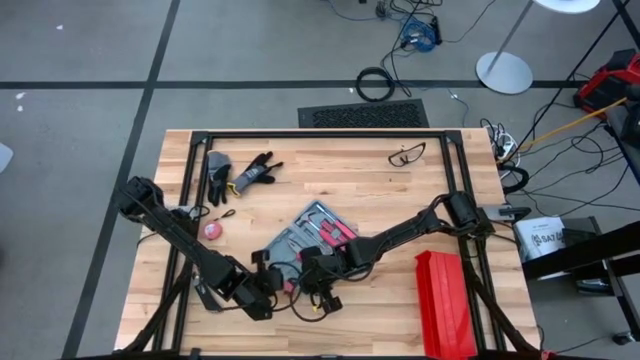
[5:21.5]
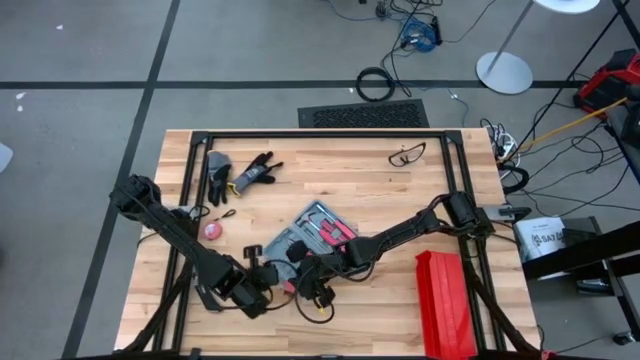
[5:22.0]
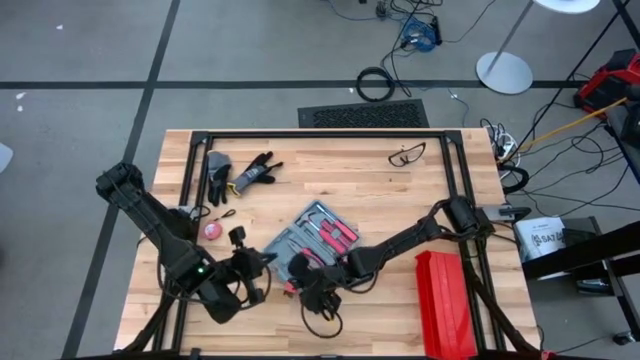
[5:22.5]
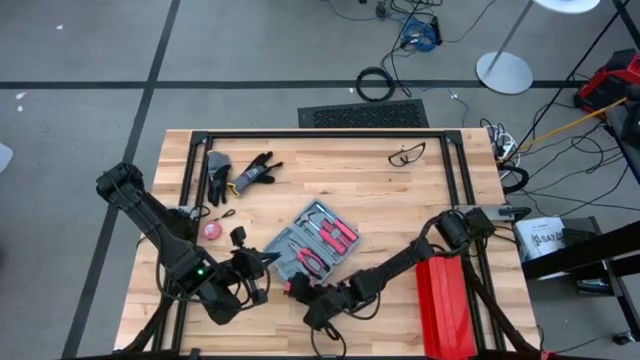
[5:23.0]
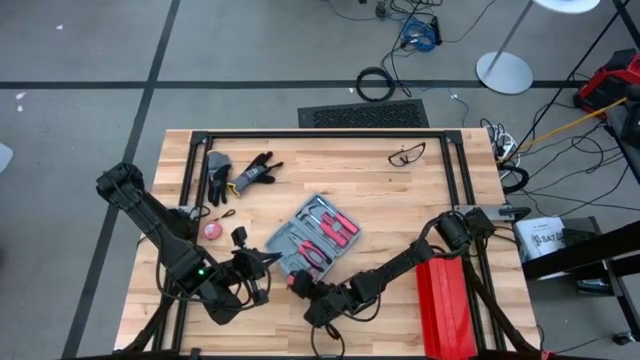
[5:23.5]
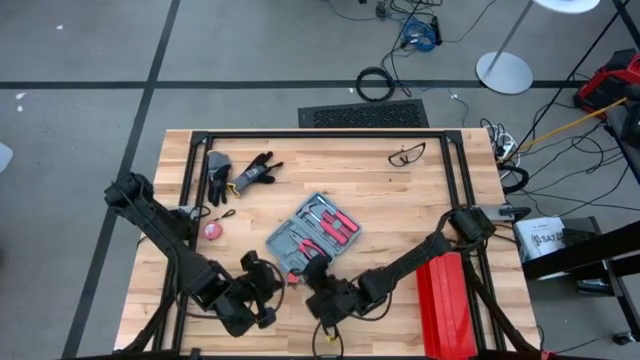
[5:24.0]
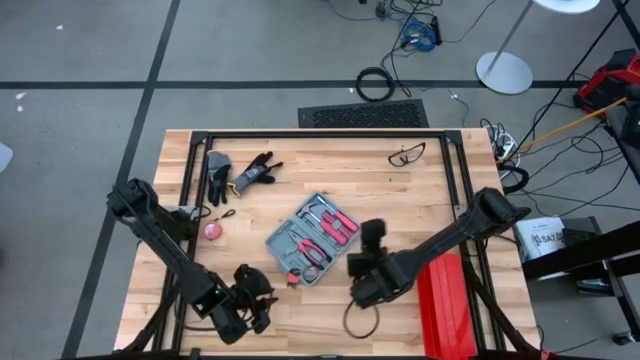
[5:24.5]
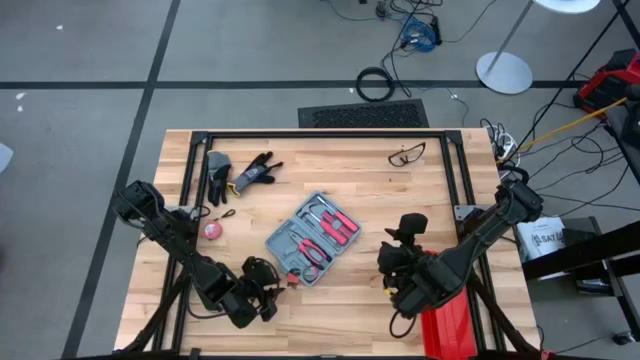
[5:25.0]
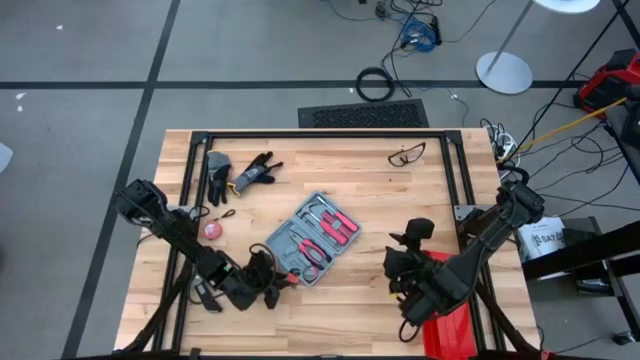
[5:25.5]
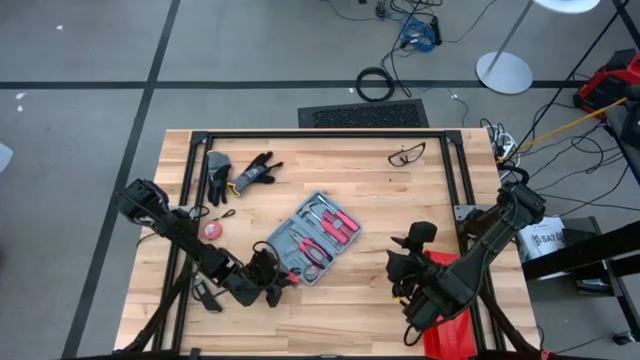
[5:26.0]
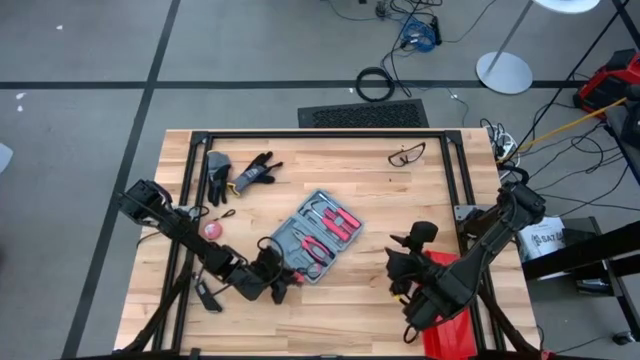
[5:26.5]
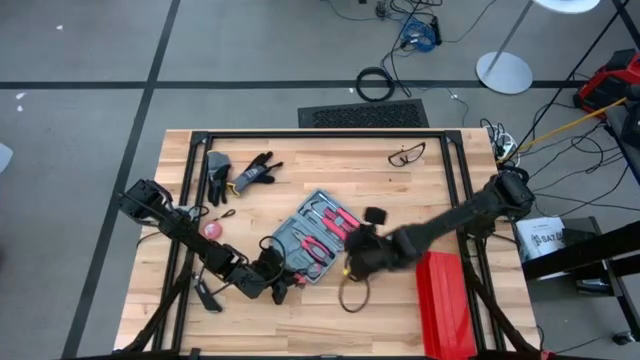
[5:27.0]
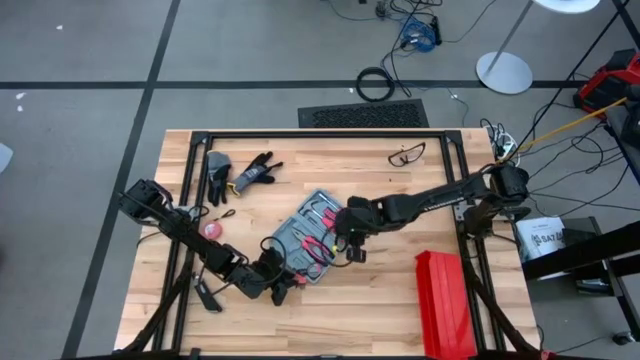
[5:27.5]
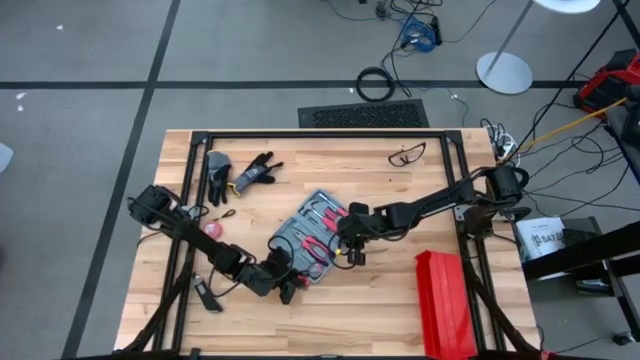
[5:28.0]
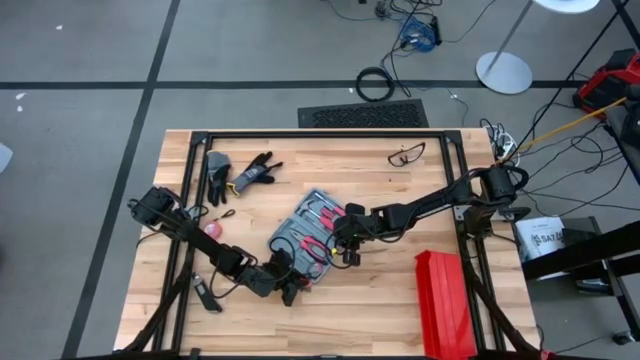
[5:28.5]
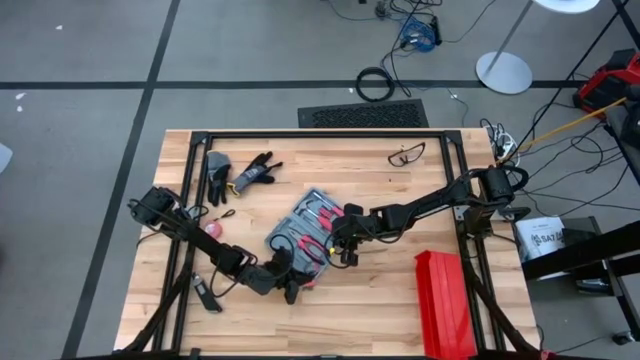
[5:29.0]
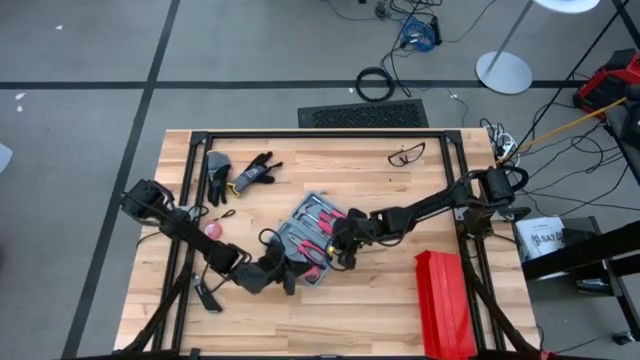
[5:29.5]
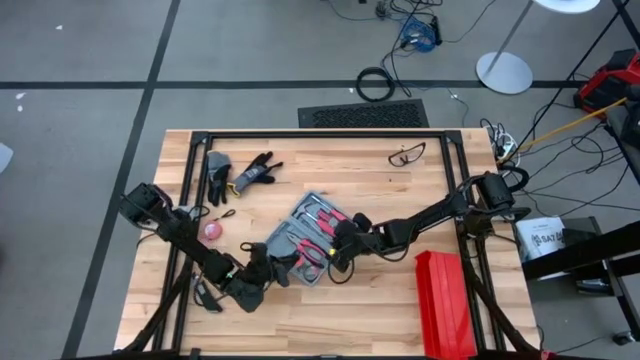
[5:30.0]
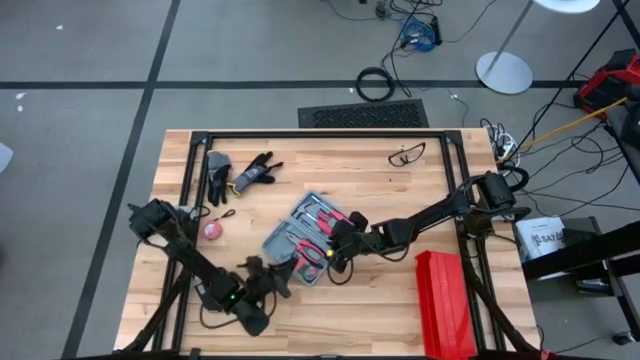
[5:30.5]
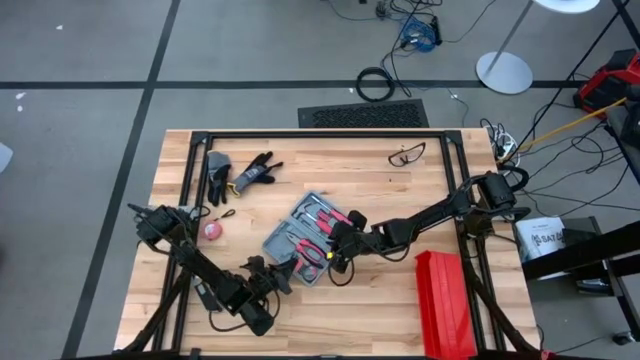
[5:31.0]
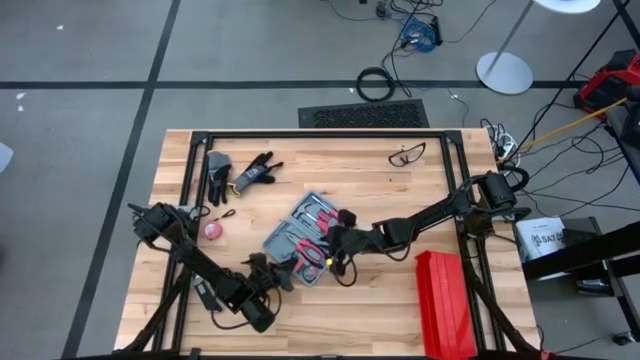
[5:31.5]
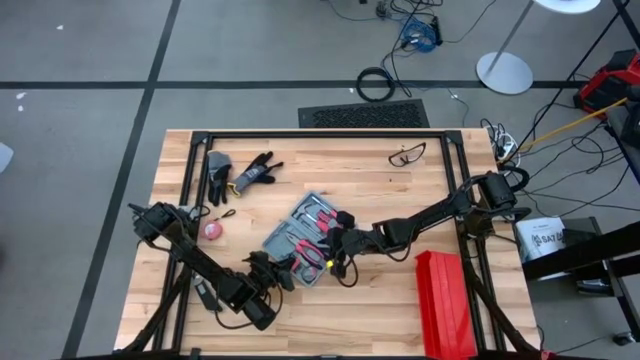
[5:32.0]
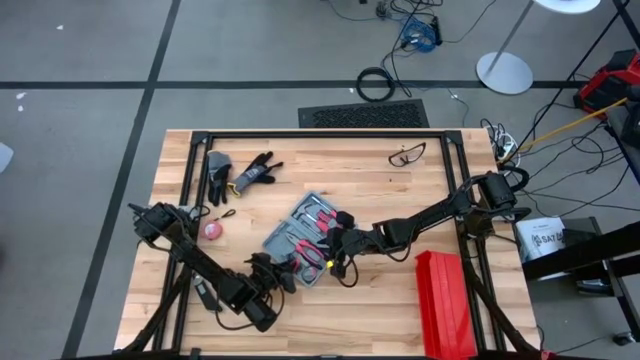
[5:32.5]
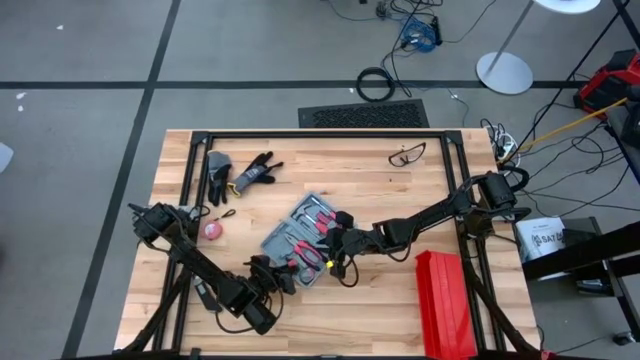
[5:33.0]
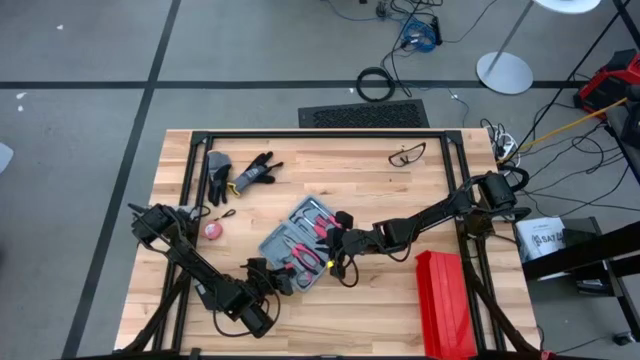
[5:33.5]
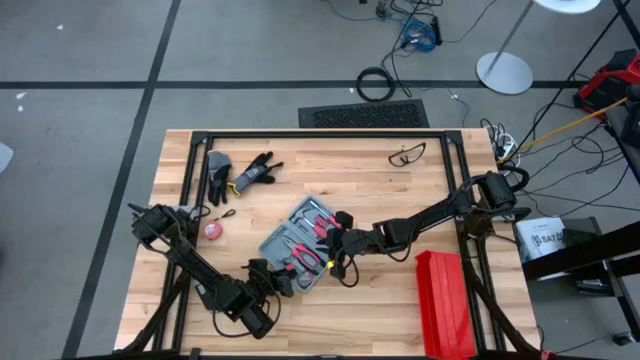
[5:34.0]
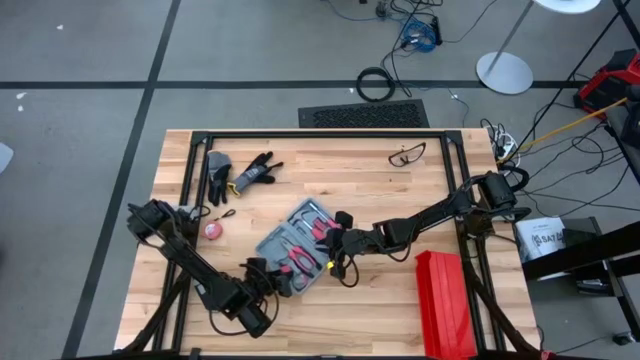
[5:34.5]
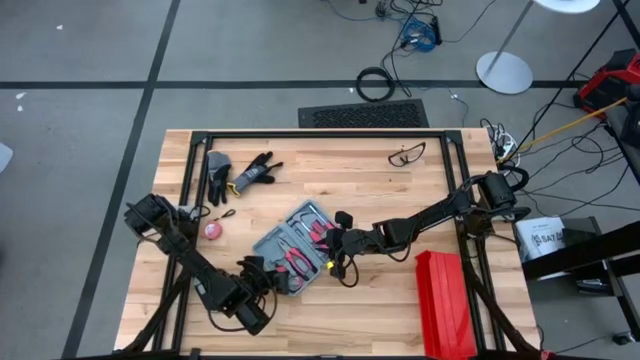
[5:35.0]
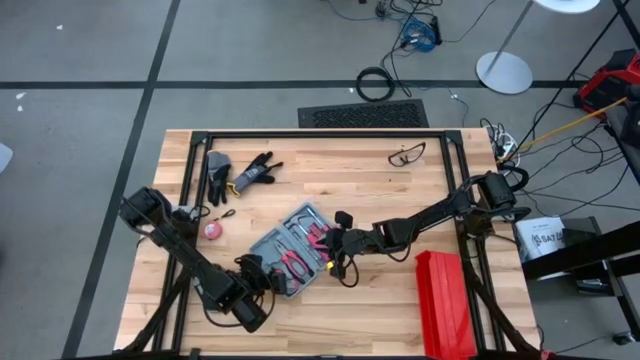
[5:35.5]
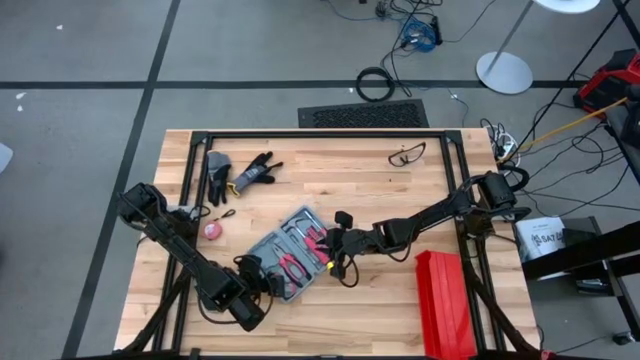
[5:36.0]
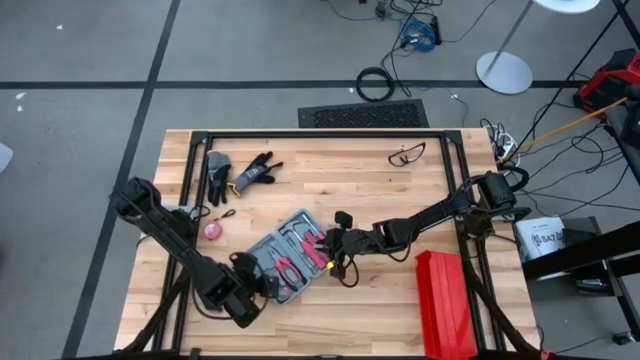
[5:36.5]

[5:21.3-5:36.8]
Task: prefit tool cases
Put the red allen wrench into the gray prefit tools case

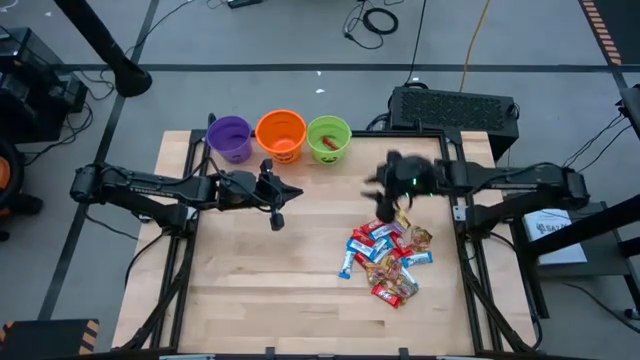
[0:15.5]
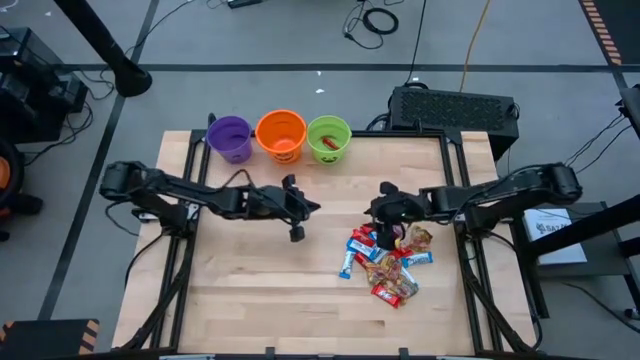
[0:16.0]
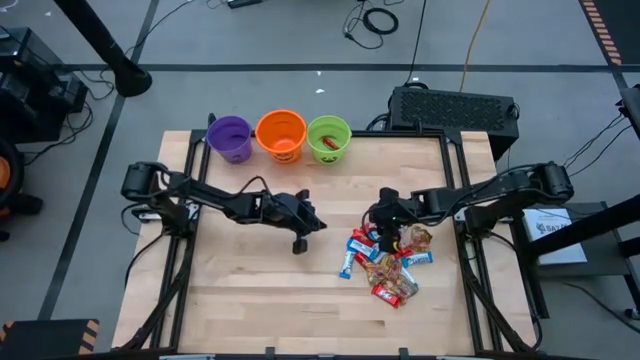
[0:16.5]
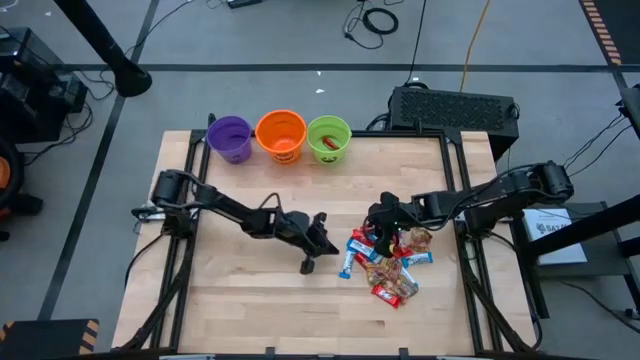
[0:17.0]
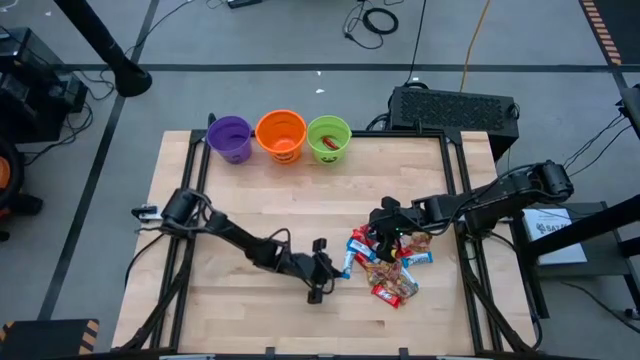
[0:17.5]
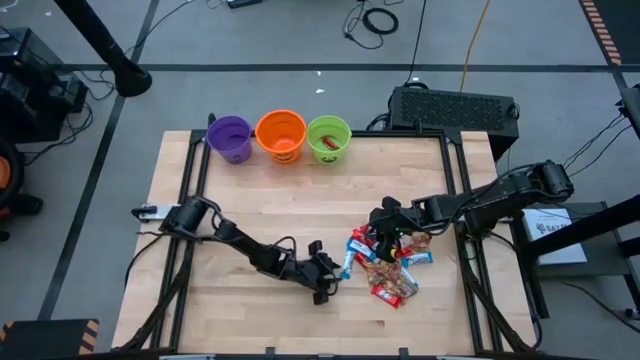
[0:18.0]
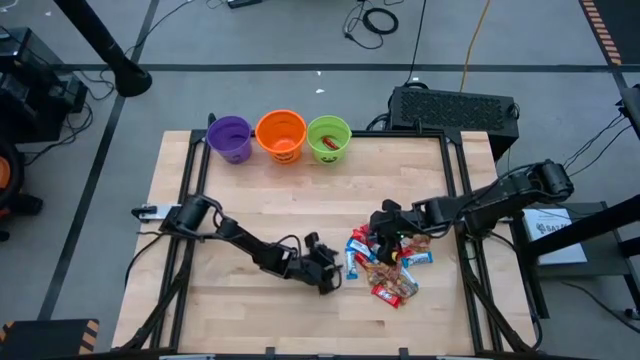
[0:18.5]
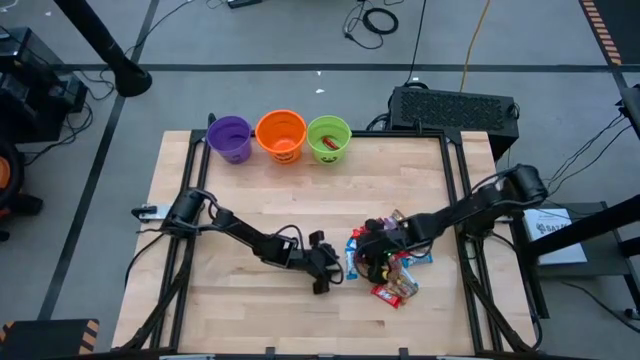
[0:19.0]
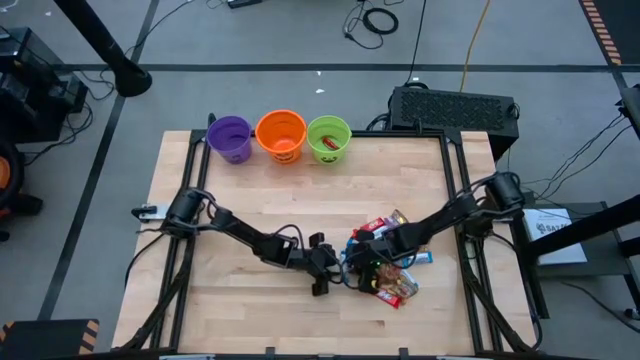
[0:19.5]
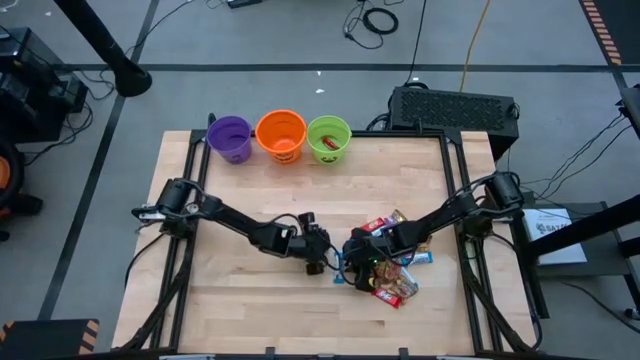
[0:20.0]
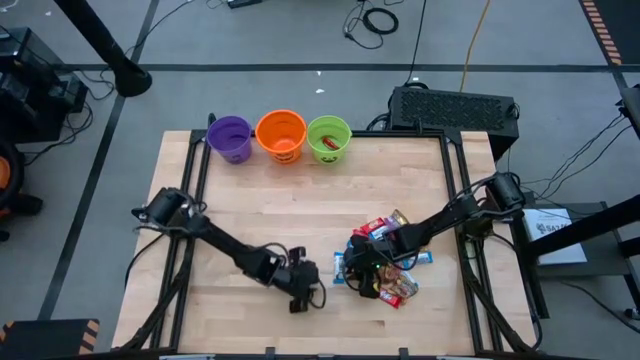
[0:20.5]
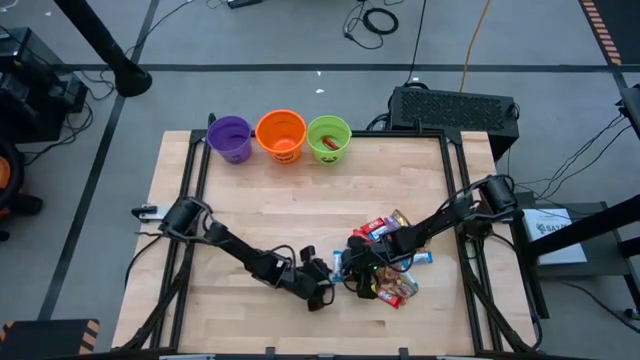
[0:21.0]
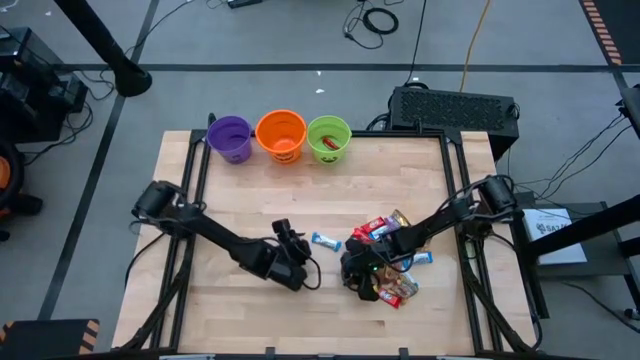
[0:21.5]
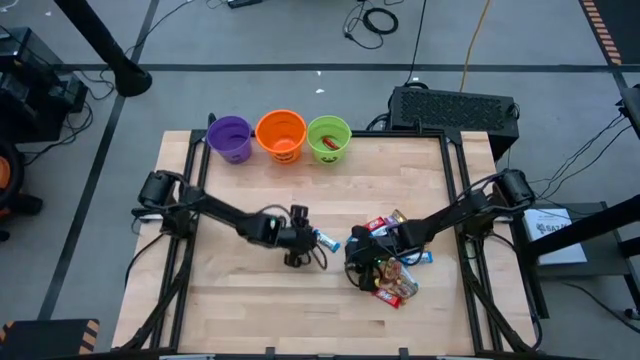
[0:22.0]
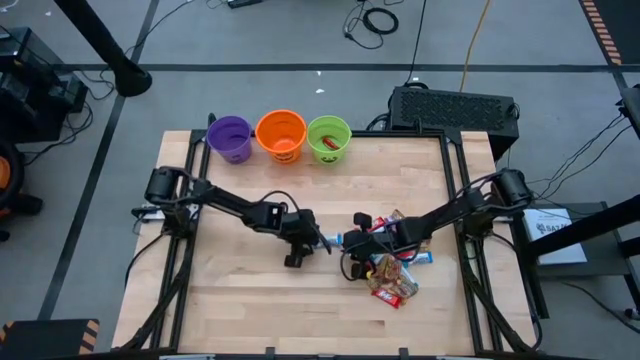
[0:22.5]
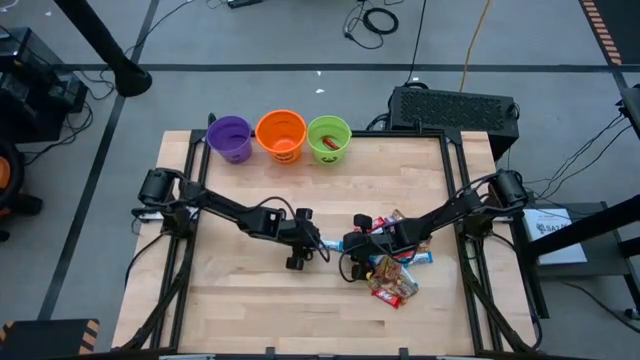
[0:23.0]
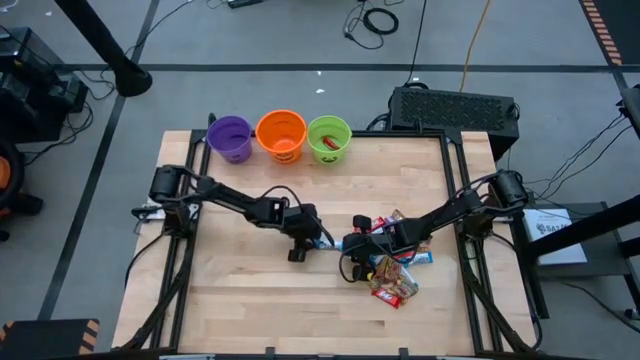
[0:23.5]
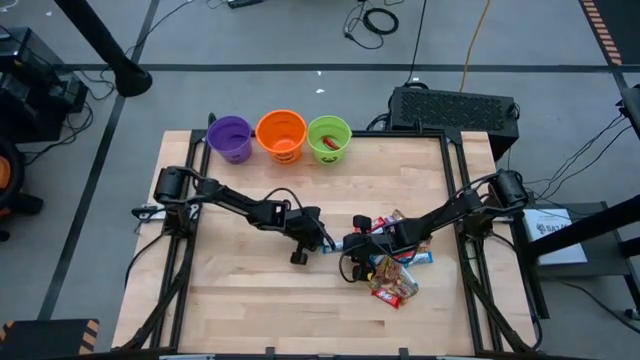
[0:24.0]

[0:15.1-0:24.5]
Task: Sort candy by brand, put in halloween buckets
Put the white chocolate bar into the violet bucket
